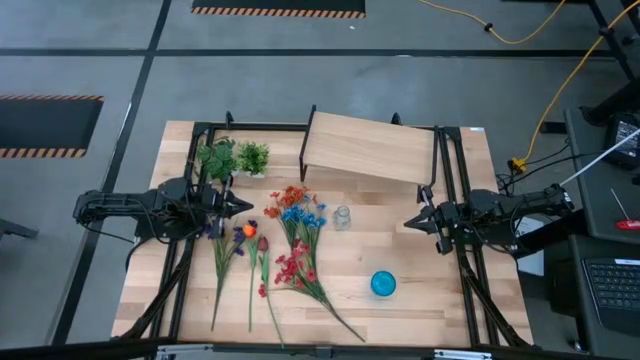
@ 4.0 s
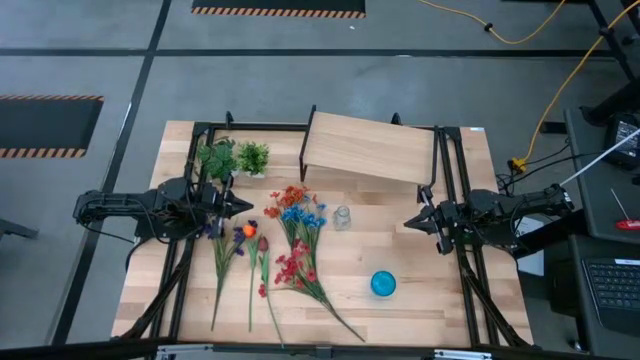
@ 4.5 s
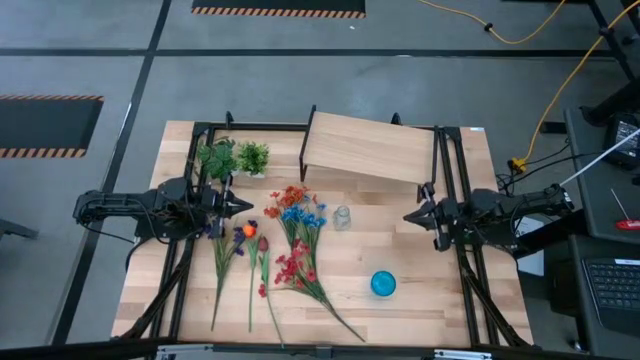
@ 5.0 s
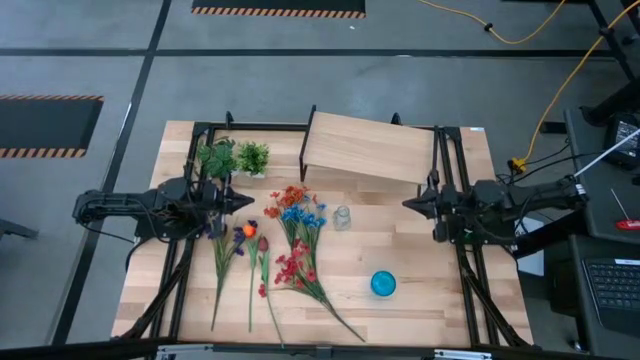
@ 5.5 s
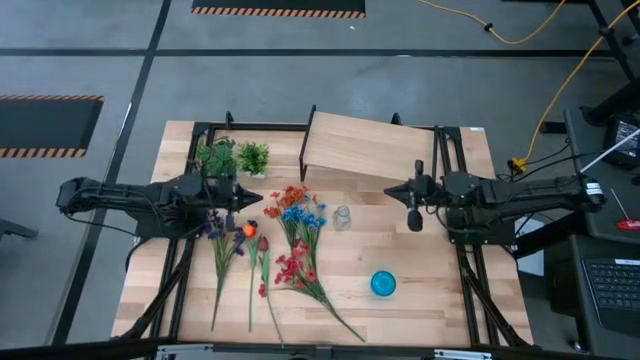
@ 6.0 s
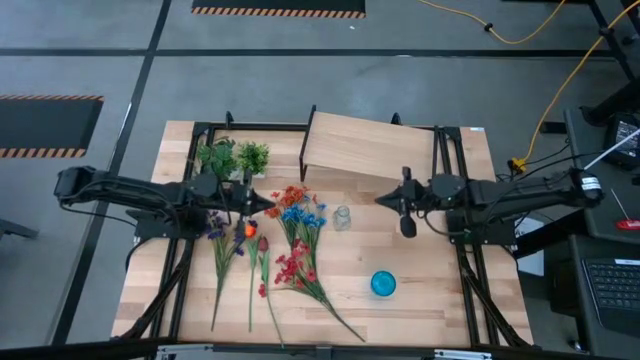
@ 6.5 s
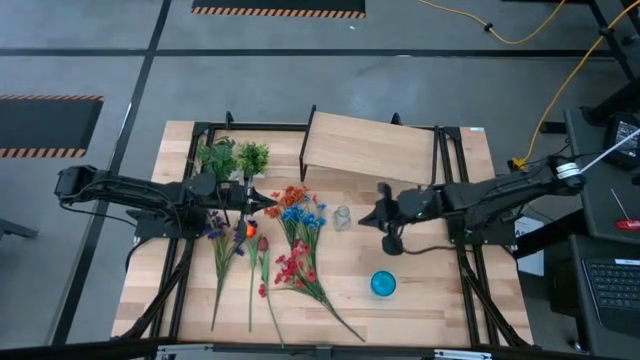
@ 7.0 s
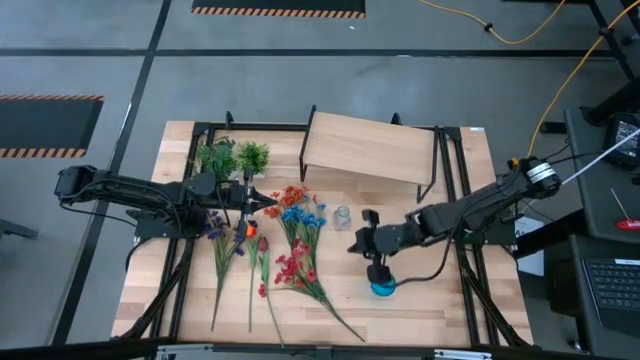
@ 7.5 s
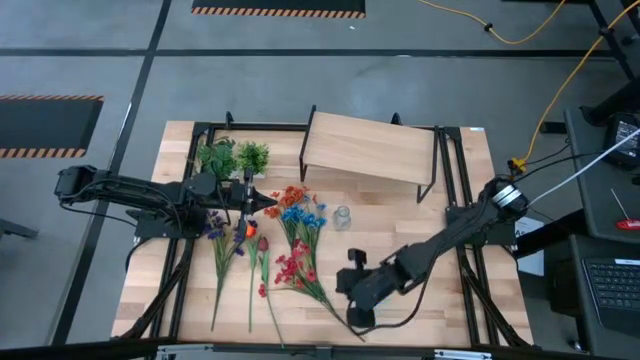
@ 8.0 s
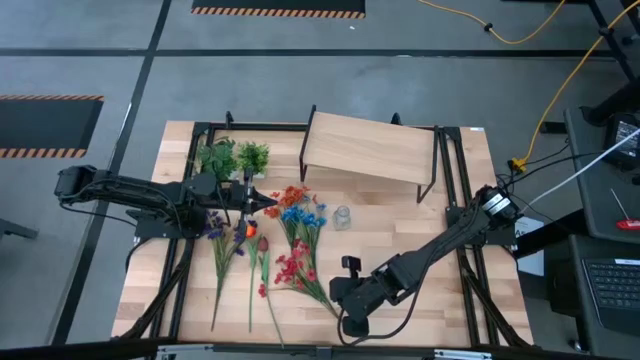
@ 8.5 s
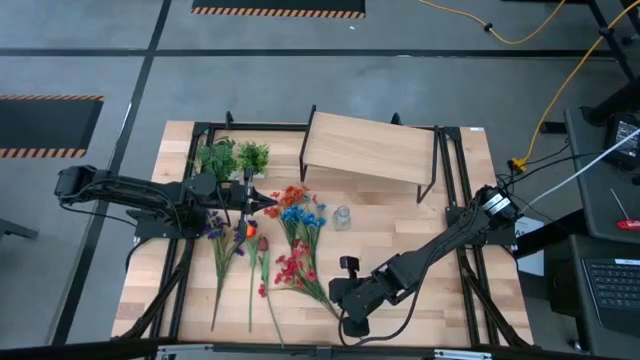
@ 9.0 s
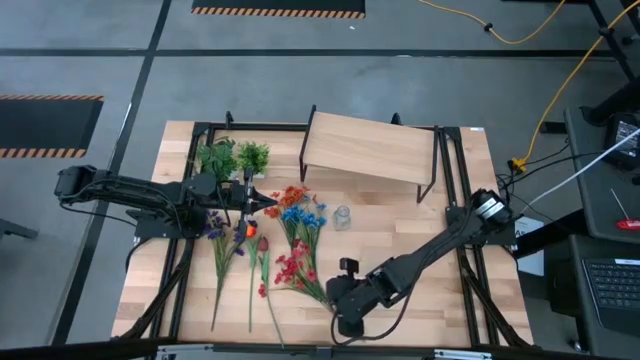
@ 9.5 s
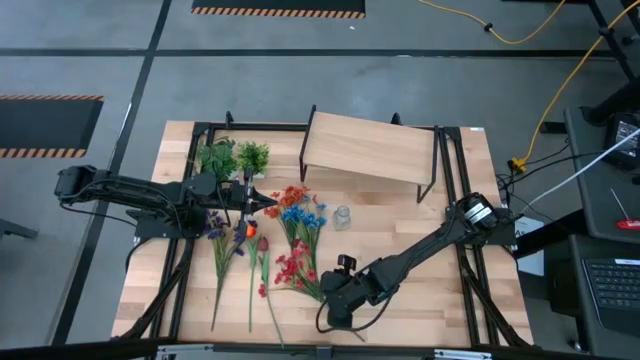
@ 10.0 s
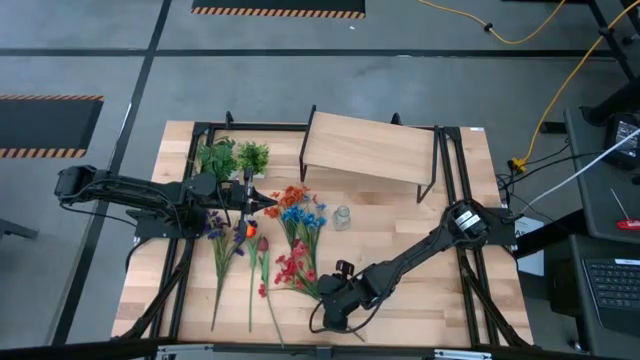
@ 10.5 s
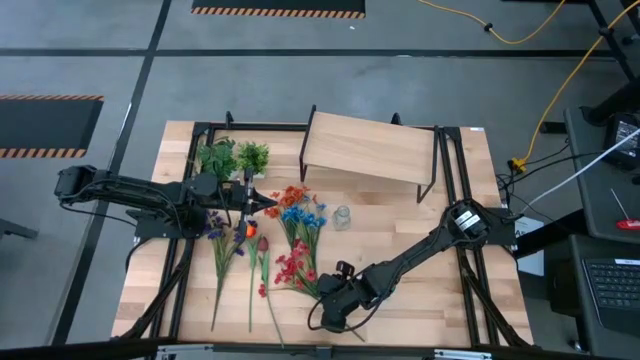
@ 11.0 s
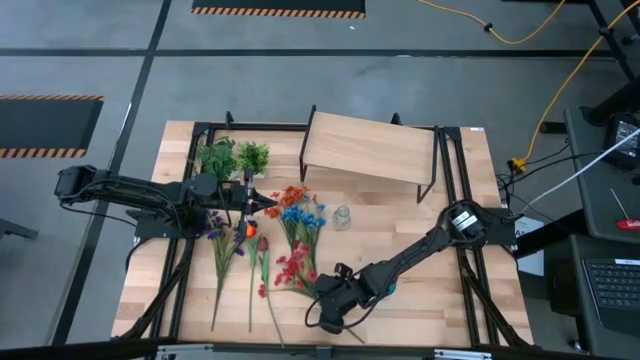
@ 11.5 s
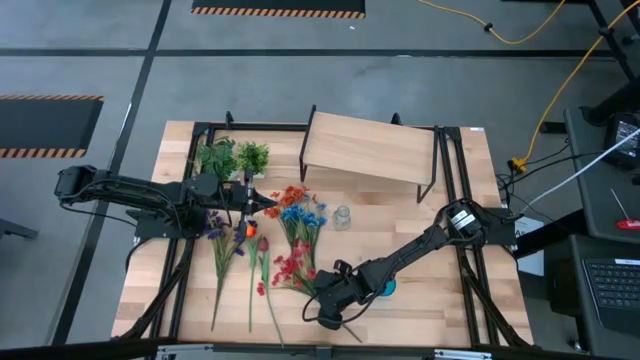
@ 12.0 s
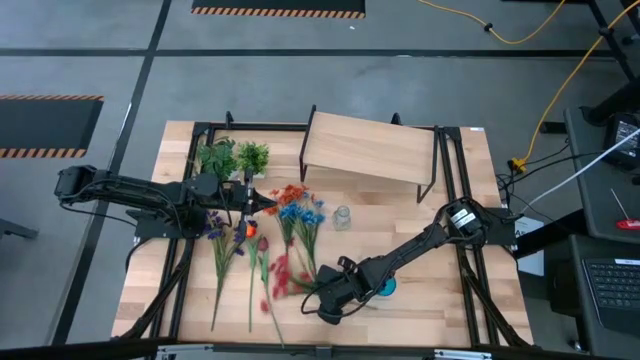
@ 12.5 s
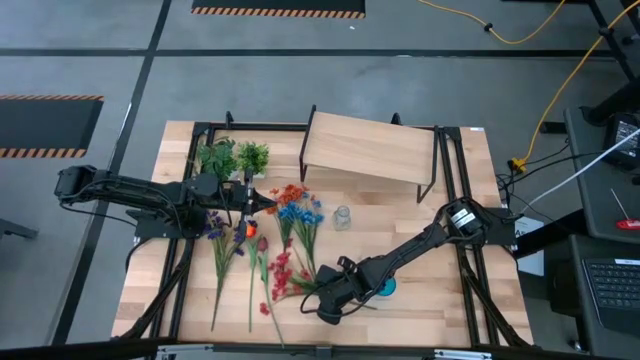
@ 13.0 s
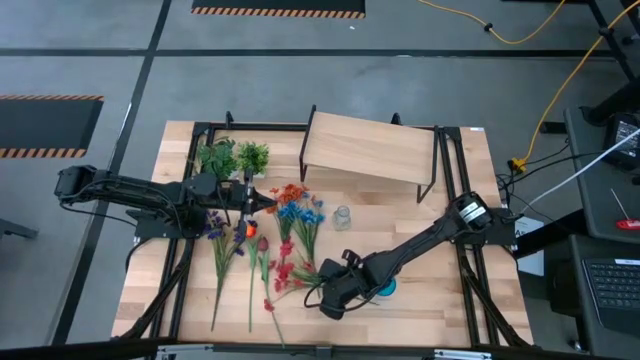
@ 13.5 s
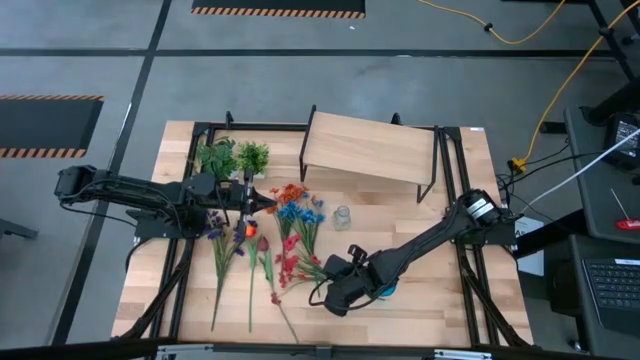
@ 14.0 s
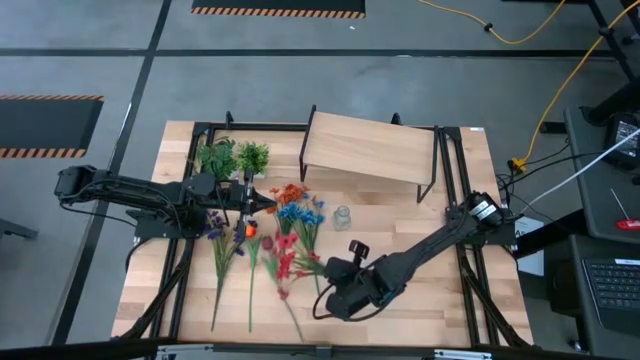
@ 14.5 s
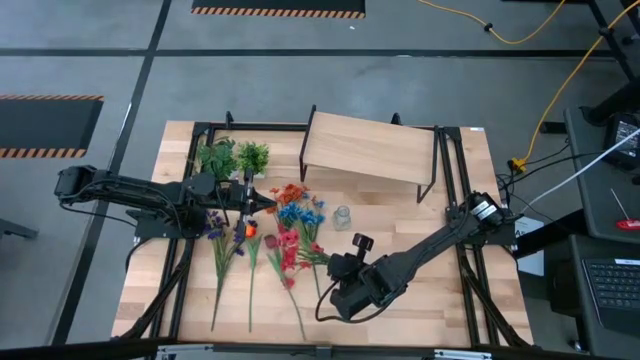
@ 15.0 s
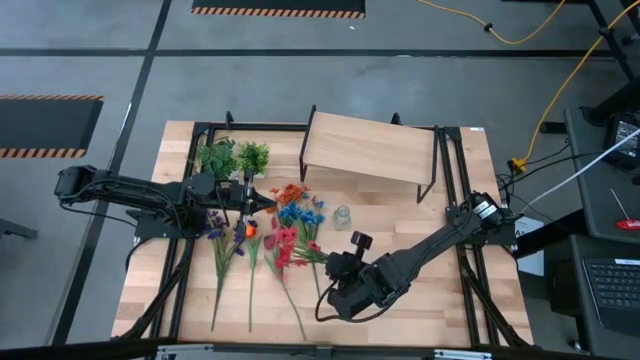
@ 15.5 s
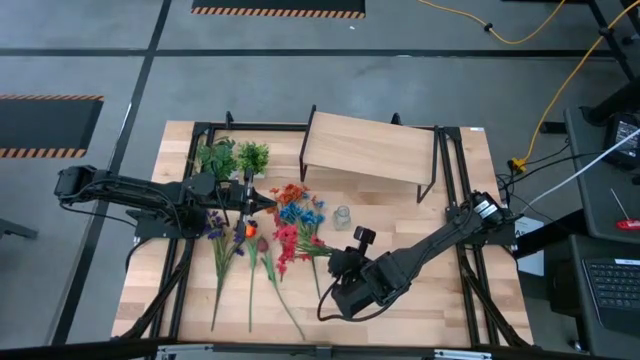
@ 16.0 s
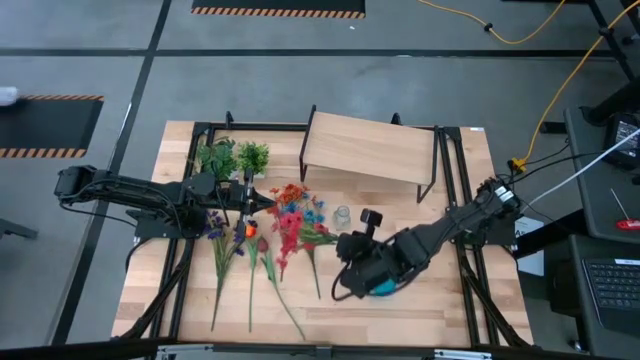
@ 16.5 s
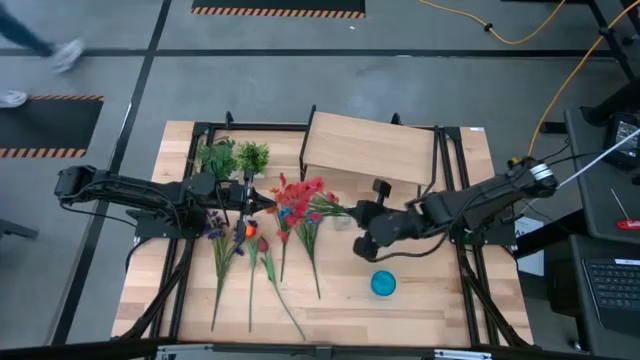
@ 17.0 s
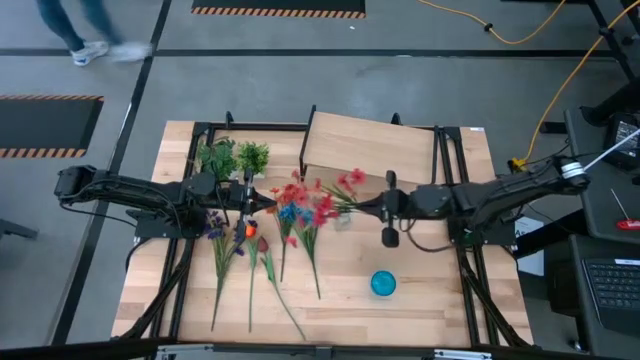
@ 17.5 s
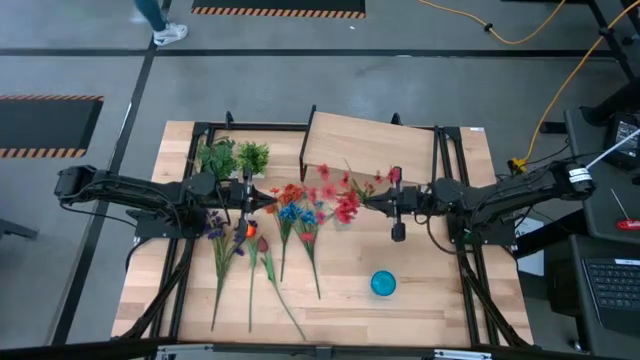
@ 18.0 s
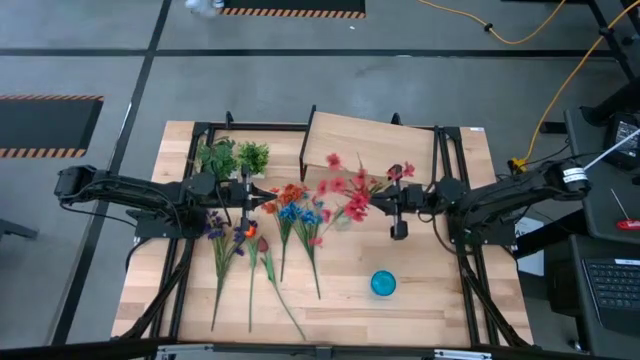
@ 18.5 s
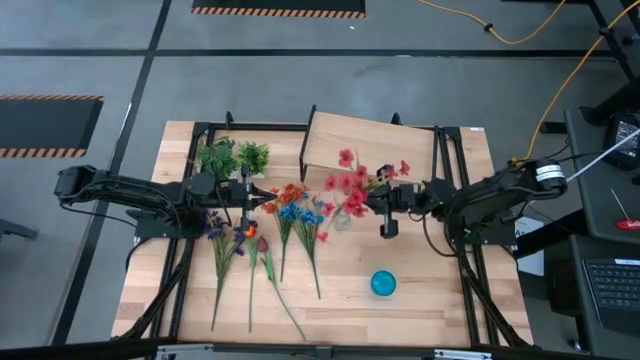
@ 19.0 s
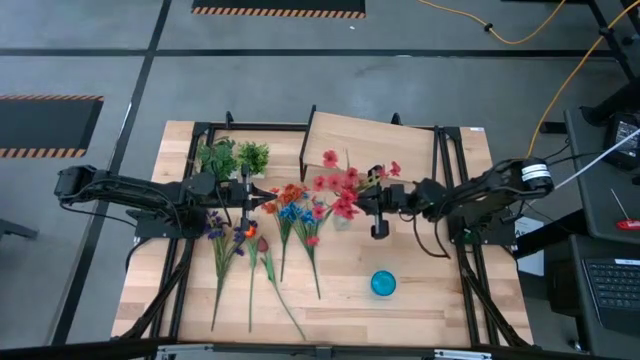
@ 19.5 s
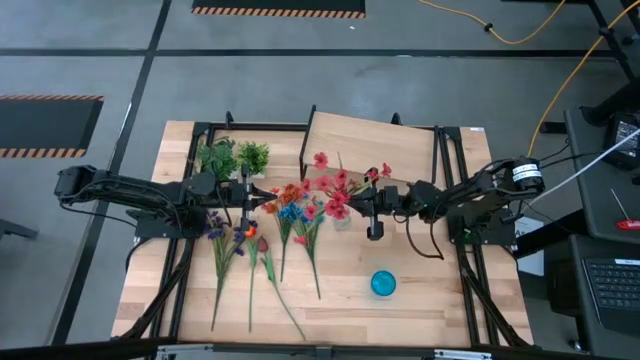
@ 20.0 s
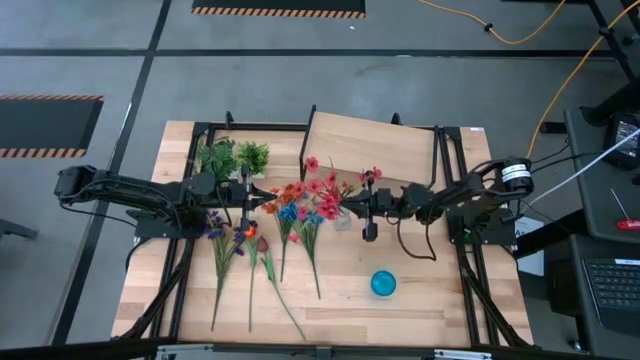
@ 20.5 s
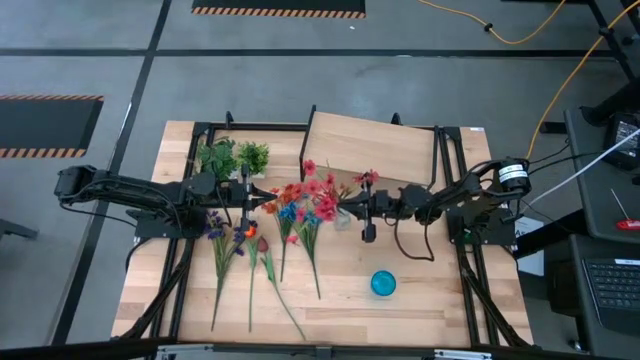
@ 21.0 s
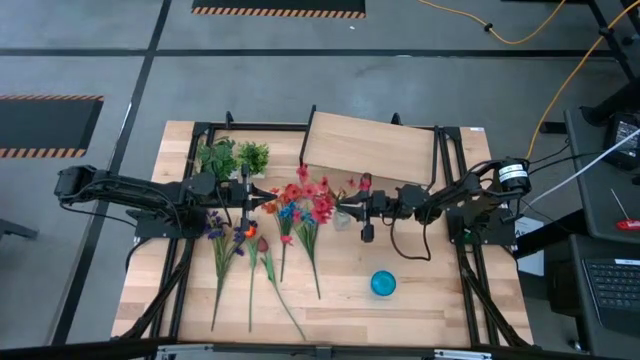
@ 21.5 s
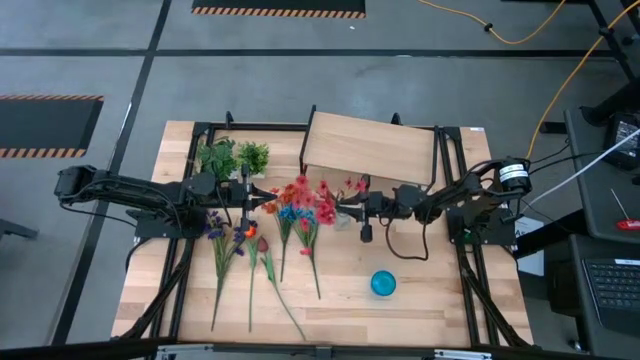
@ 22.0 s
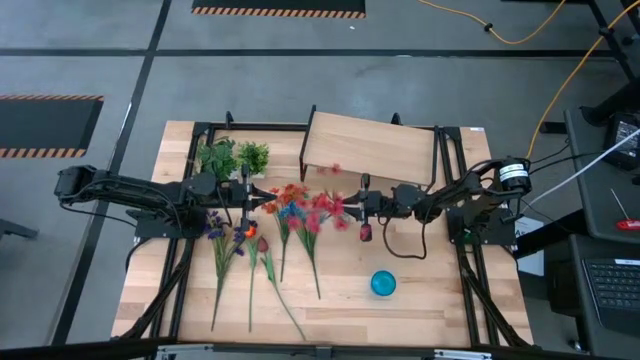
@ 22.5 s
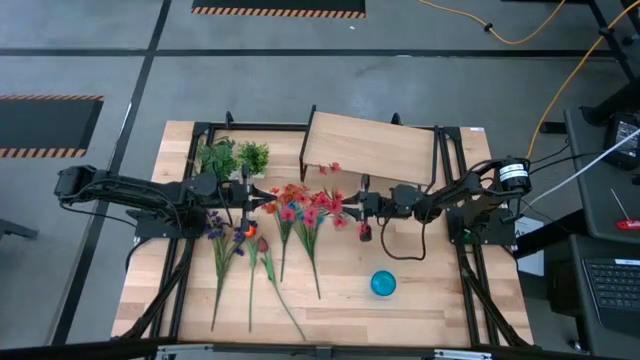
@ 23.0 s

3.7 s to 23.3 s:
Task: Pick and place flowers into a vace then onto a shelf
Put the red flowers into the transparent vase
